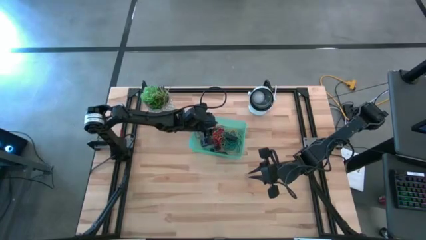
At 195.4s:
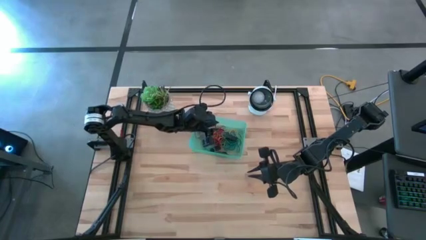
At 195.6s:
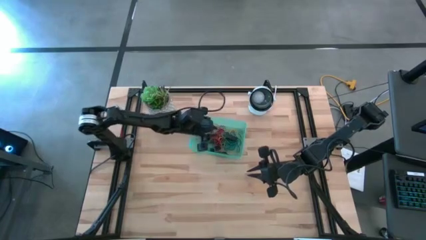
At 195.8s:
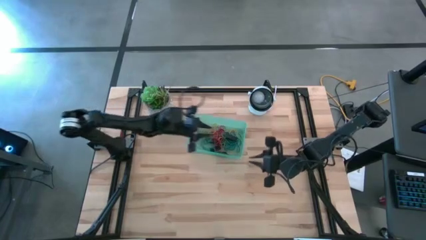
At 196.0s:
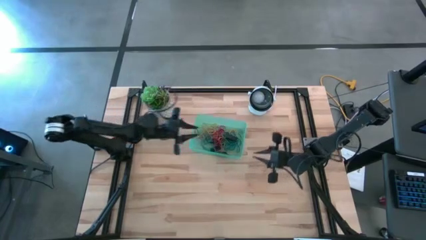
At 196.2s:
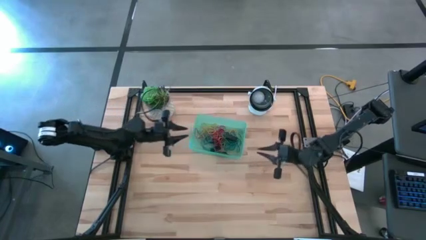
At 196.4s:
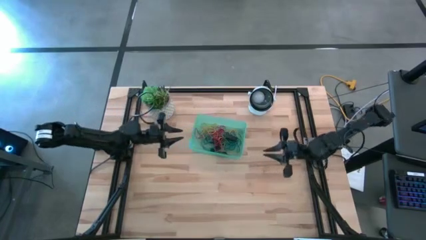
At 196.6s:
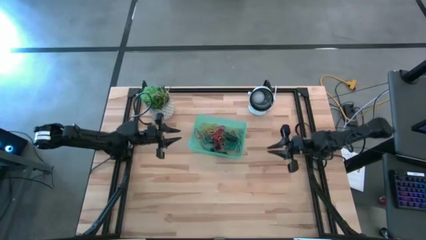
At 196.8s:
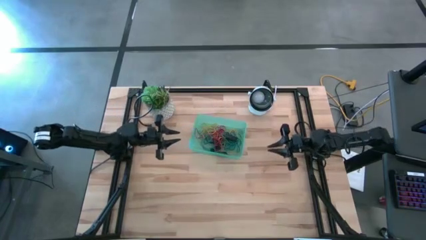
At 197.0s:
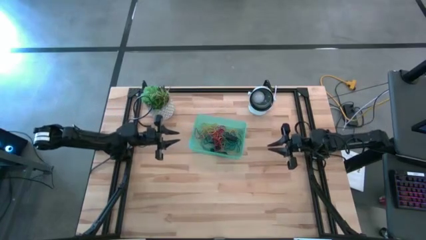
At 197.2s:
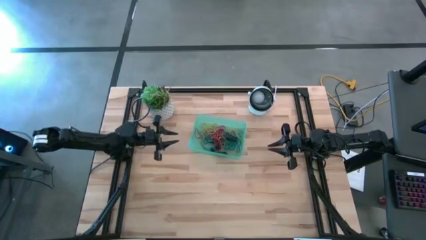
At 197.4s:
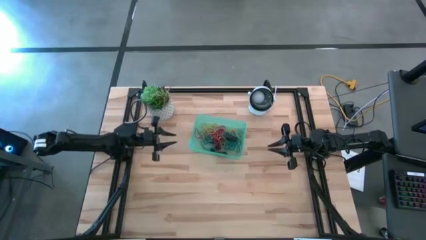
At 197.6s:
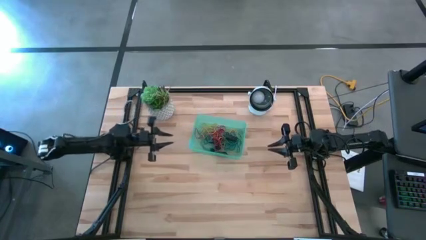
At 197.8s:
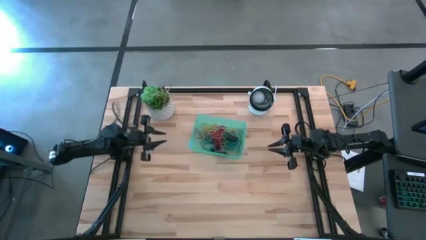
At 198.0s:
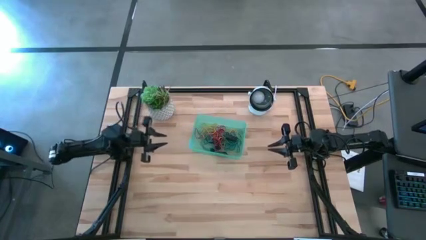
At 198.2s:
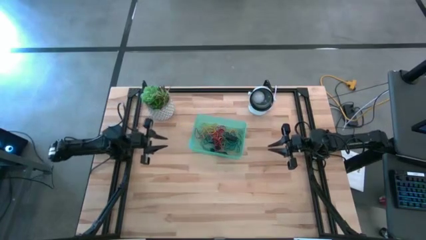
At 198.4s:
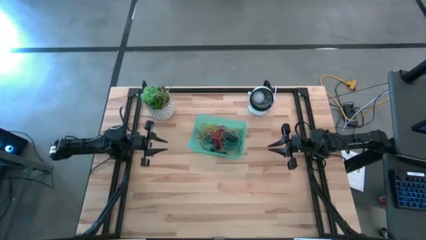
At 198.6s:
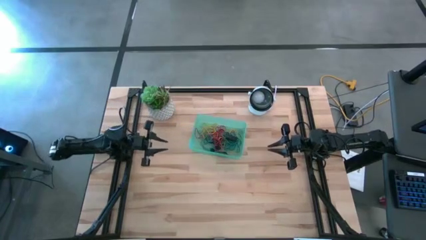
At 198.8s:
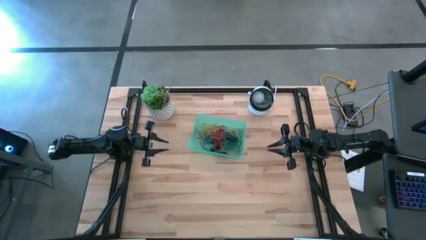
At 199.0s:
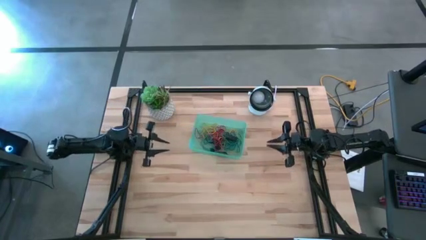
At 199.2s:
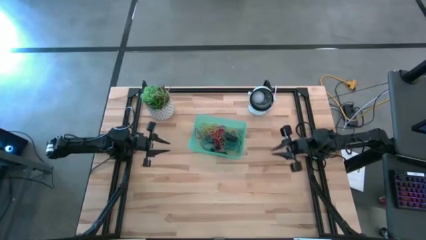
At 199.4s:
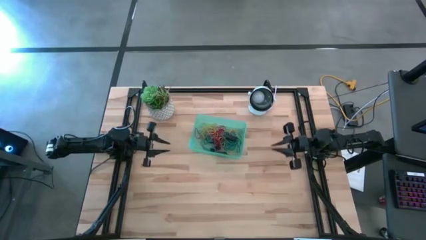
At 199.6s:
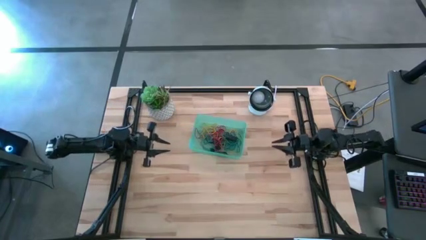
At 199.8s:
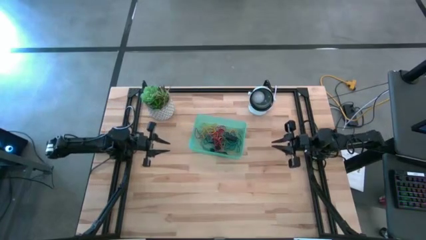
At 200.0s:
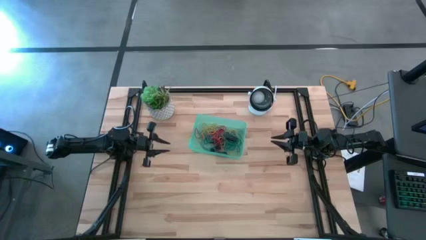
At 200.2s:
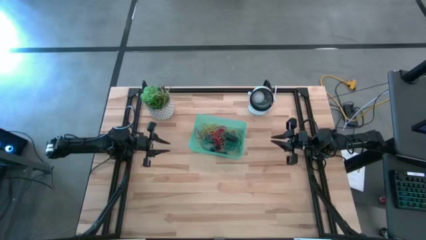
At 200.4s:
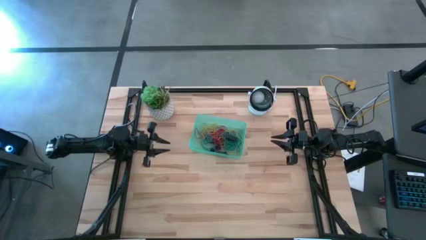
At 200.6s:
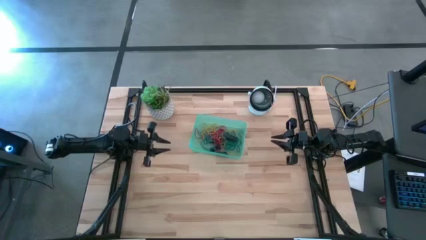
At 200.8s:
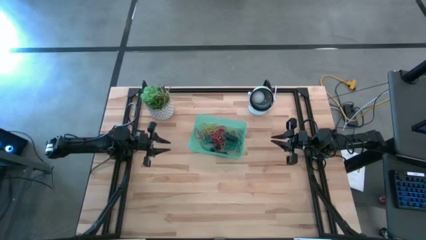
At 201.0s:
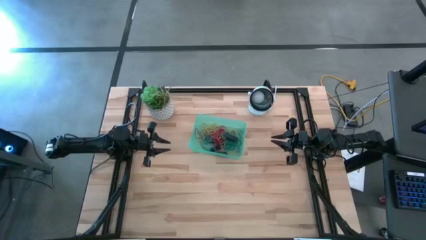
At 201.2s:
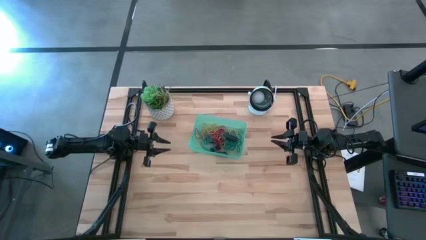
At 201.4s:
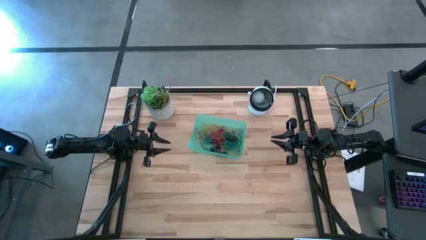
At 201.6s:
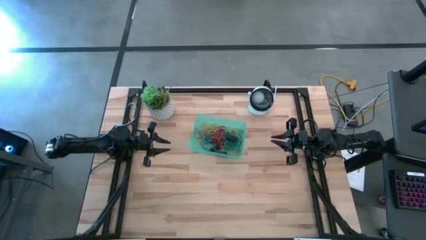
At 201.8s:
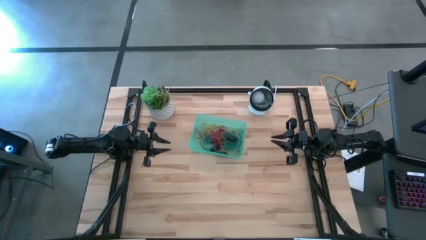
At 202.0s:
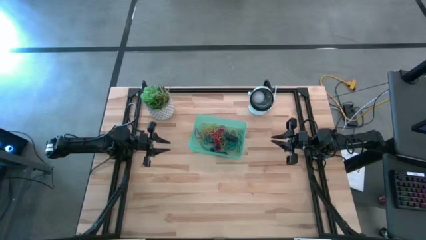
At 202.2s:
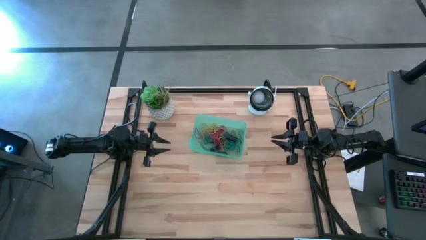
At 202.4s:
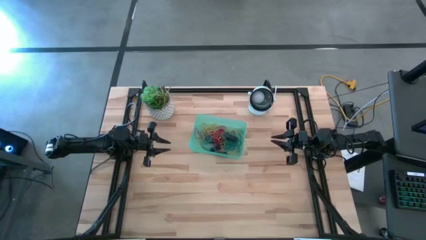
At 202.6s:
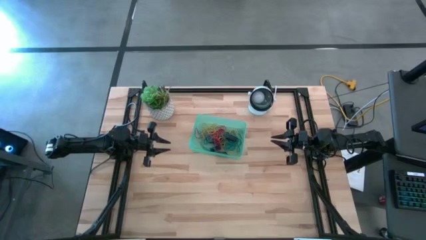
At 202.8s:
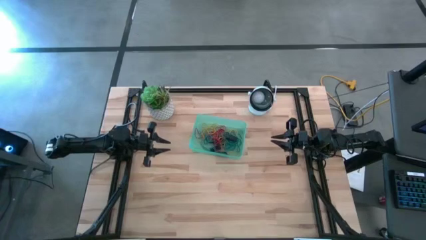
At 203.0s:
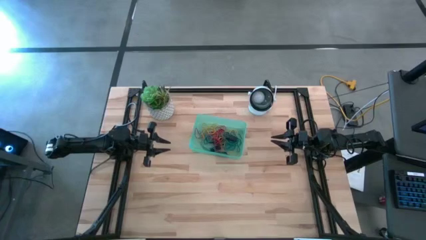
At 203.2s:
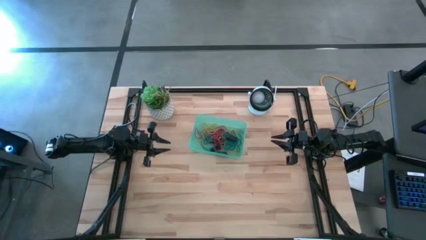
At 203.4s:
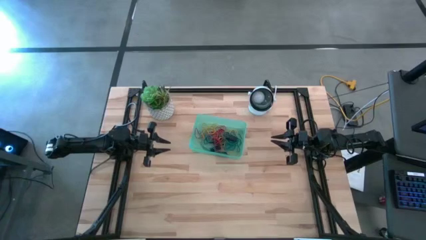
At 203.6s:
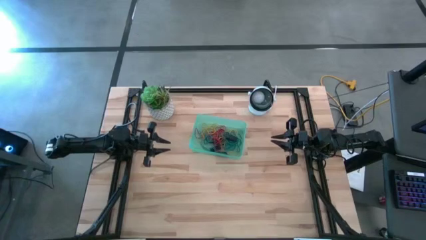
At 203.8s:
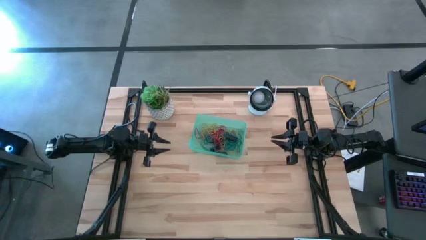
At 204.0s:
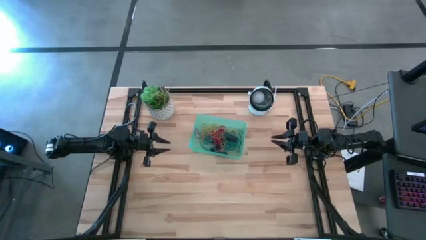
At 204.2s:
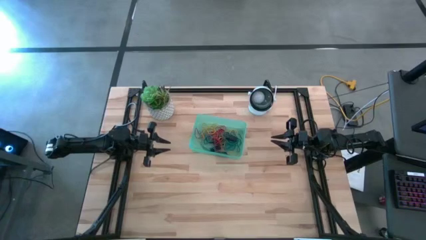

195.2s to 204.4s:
Task: Pick and place rubber bands into bin
Return to Home Position

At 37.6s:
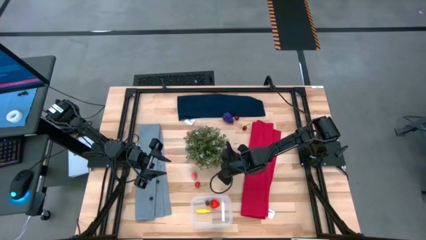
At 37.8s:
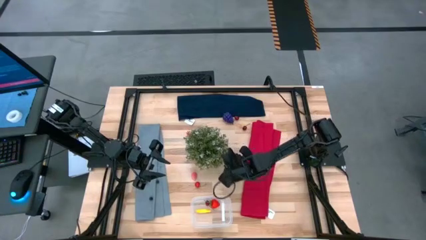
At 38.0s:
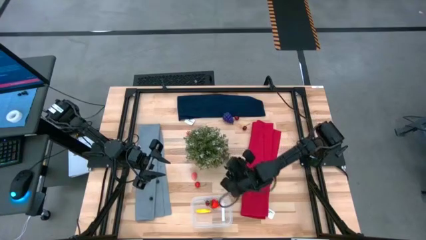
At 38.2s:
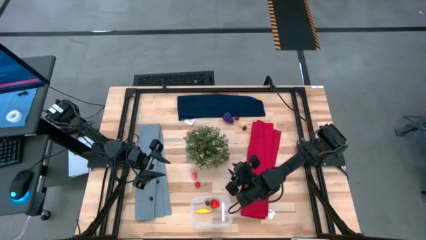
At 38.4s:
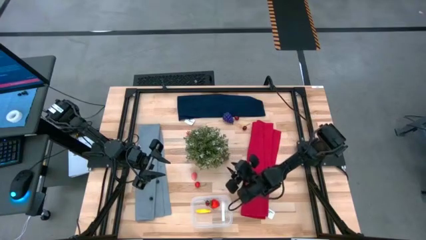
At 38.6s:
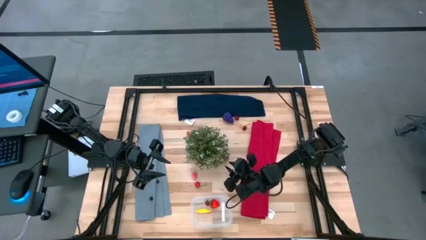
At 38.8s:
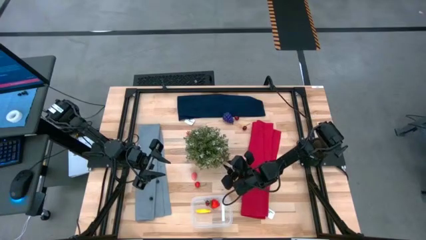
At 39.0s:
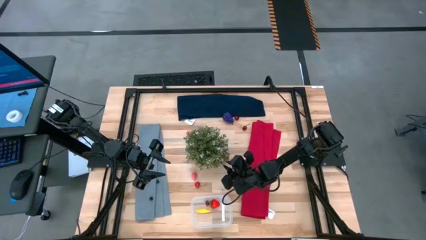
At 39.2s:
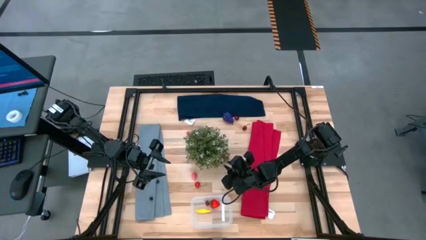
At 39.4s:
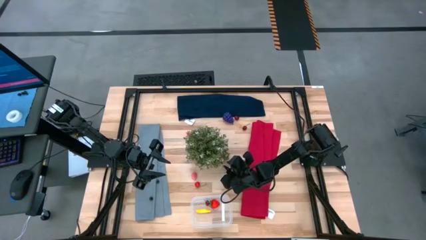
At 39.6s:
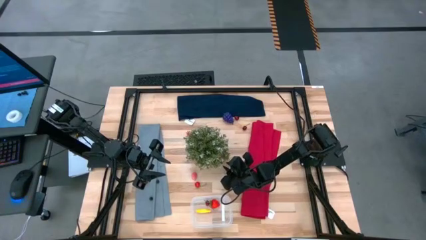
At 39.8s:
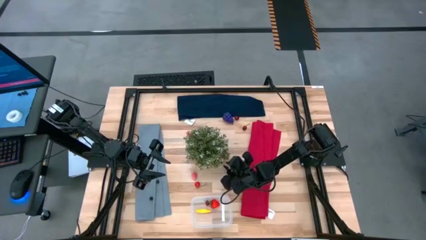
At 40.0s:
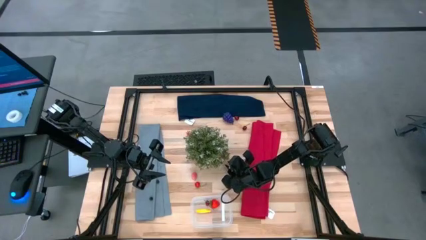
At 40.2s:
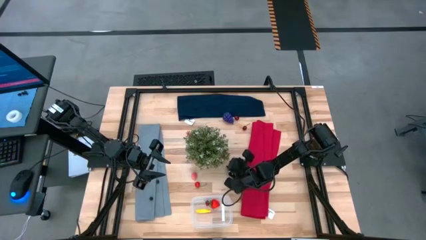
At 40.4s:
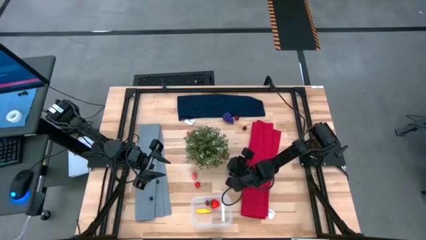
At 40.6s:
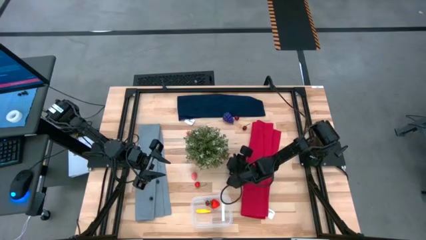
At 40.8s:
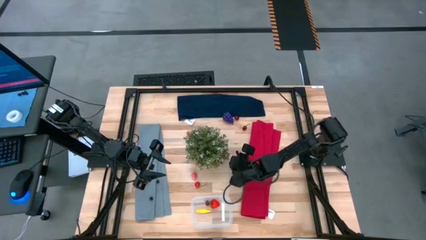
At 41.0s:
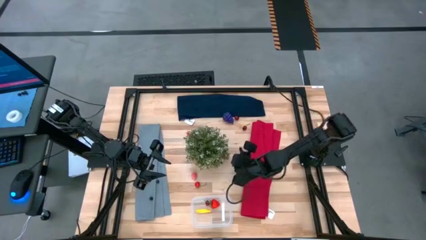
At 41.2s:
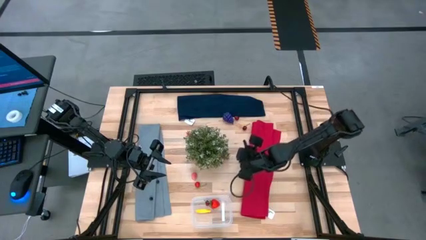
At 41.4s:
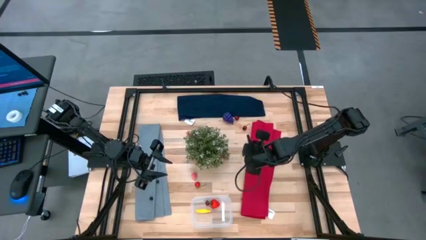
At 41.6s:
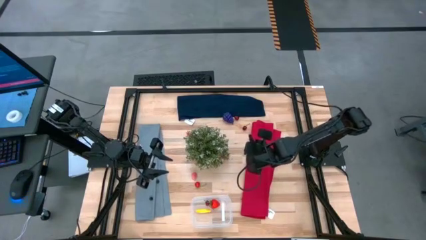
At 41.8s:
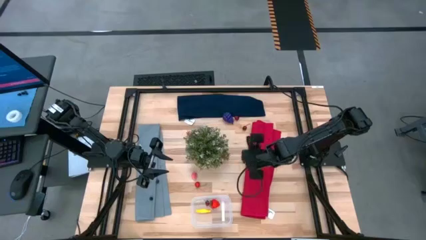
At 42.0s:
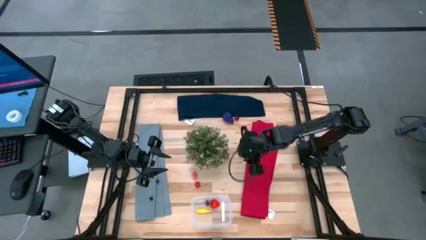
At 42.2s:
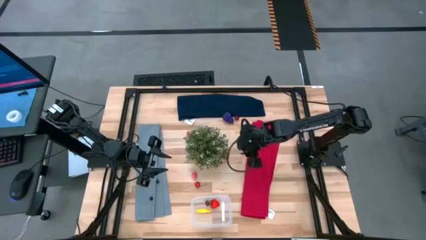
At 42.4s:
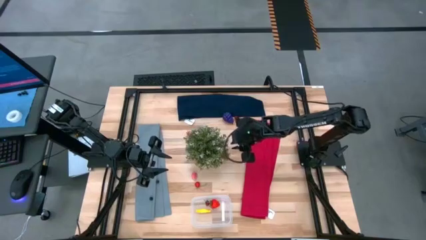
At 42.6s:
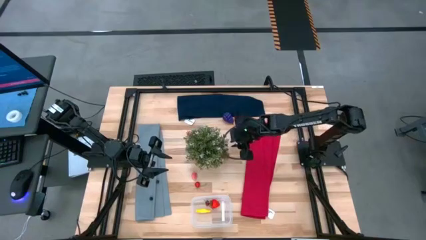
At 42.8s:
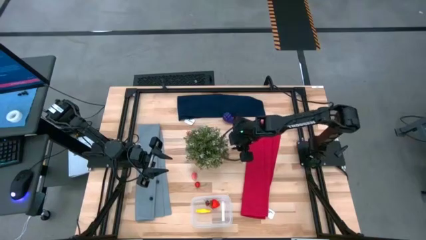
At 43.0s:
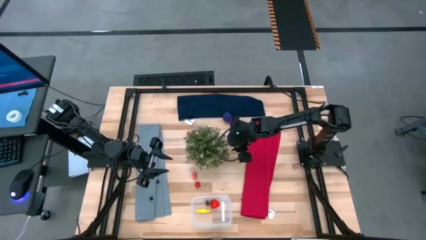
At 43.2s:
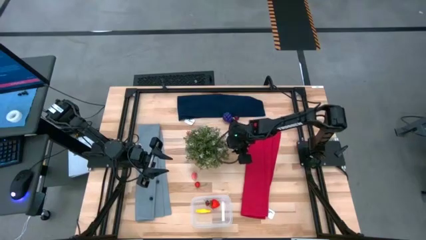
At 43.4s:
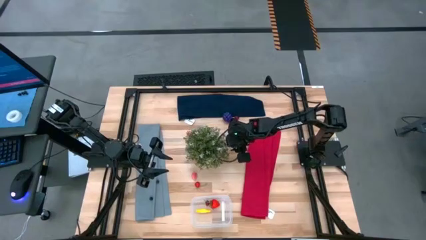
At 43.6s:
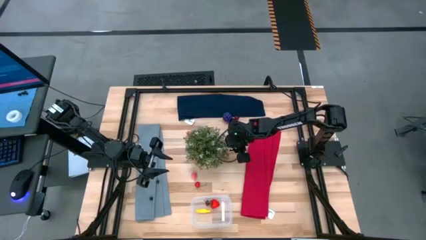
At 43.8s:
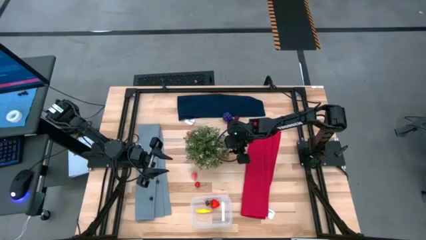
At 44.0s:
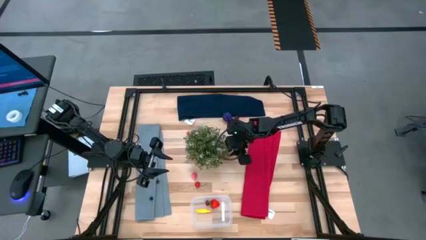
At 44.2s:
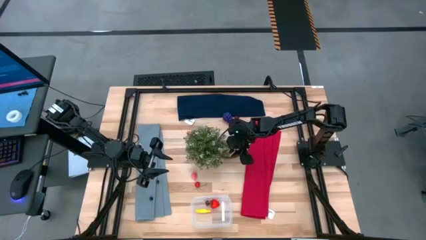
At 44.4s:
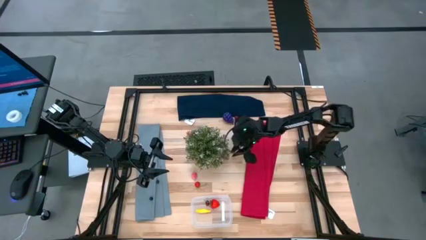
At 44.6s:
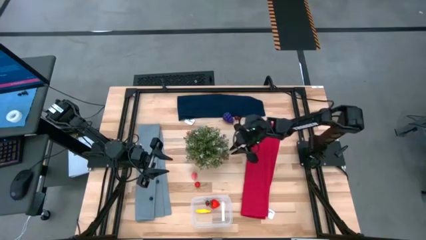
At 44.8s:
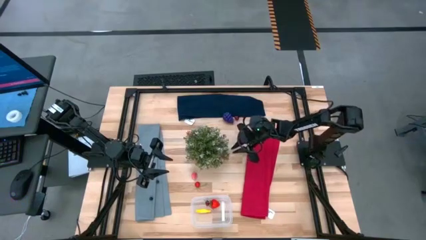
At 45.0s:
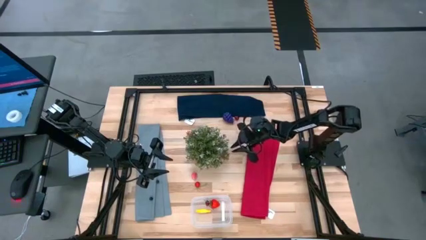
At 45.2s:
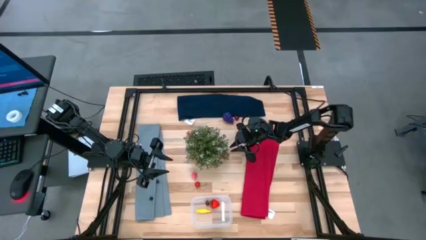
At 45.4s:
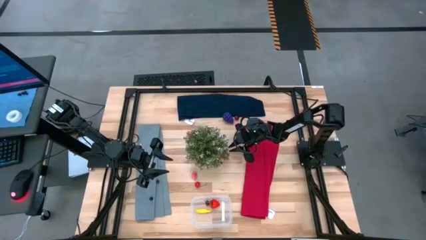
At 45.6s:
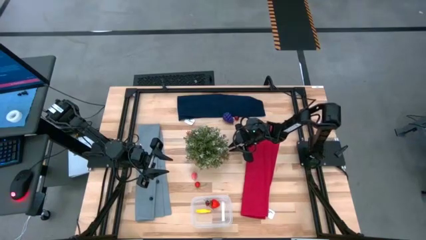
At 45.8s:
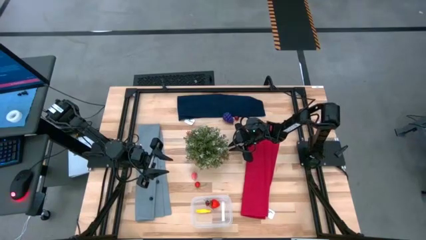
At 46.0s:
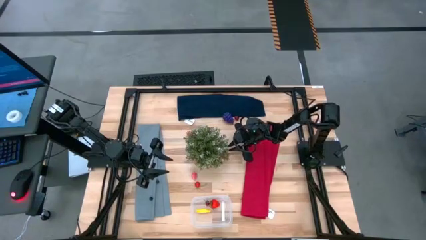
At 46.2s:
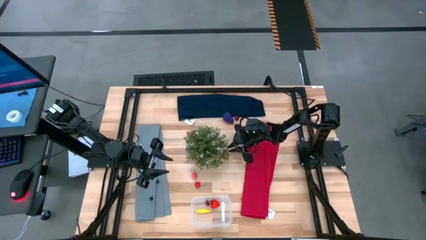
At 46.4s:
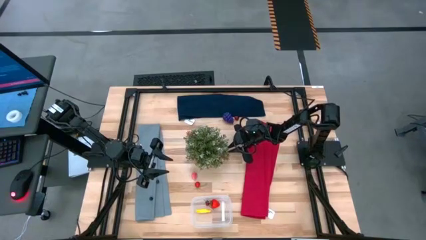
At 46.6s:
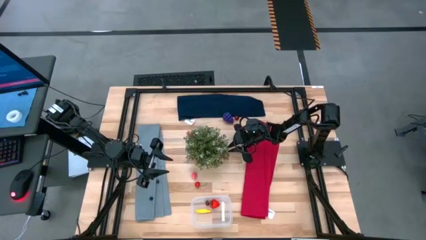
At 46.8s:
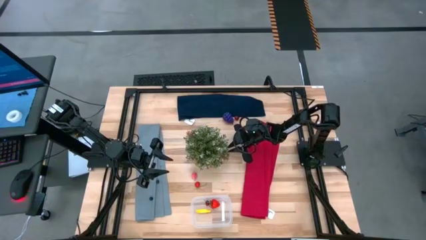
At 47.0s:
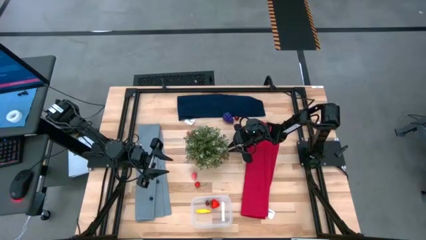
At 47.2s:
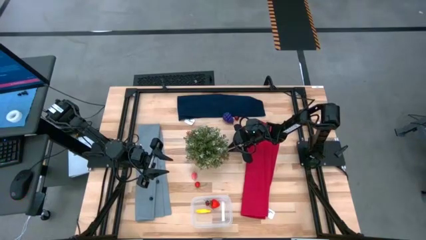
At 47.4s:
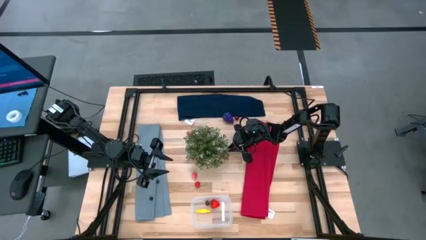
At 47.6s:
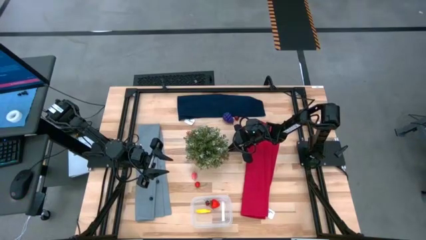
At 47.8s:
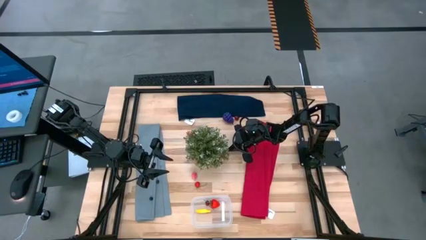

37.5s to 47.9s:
Task: Pick and placing Produce into tupperware
Put the strawberry into the transparent container
